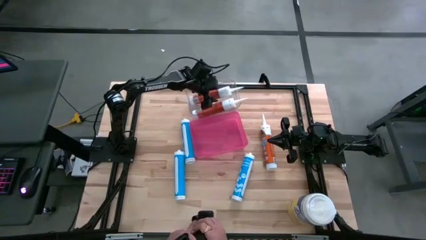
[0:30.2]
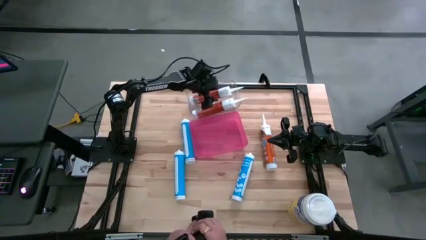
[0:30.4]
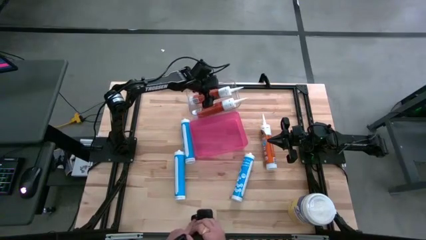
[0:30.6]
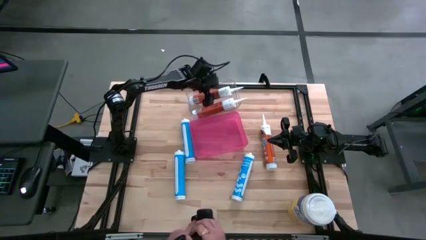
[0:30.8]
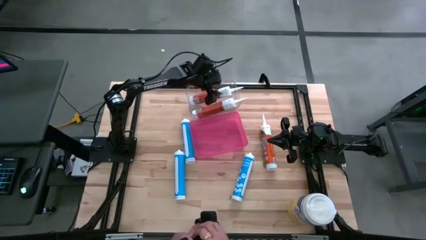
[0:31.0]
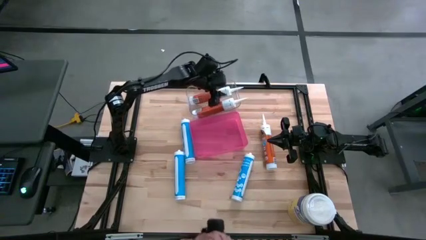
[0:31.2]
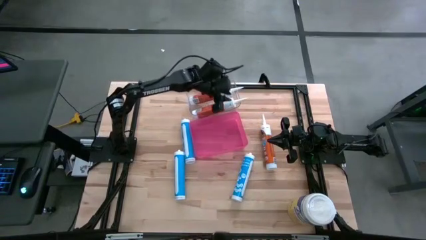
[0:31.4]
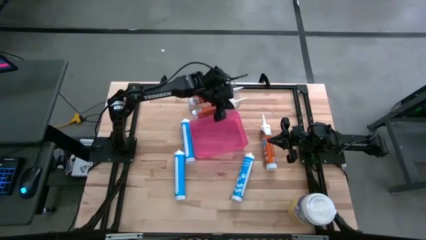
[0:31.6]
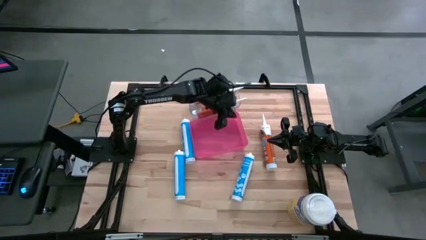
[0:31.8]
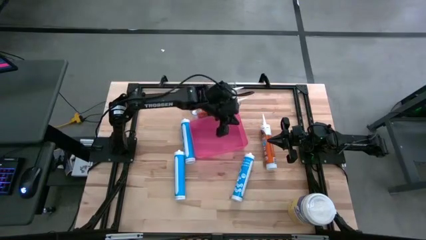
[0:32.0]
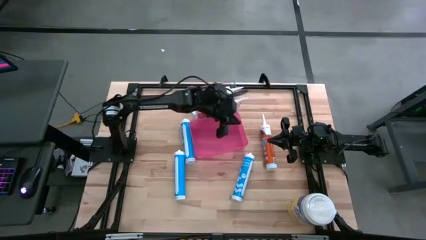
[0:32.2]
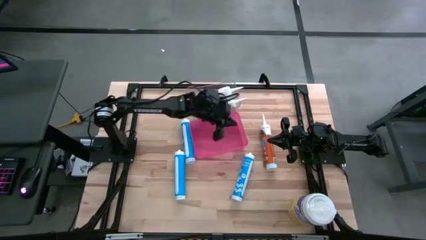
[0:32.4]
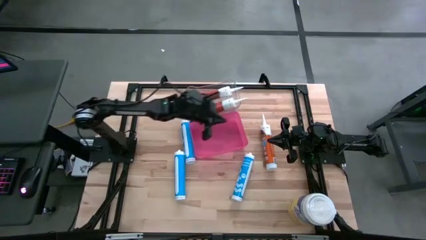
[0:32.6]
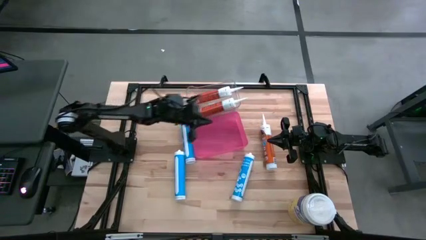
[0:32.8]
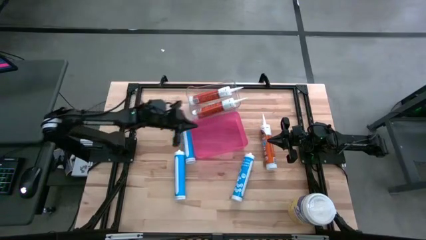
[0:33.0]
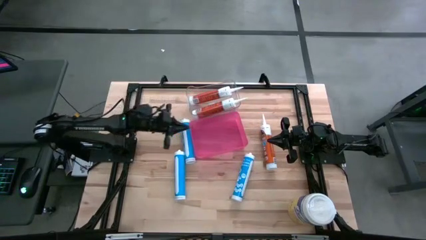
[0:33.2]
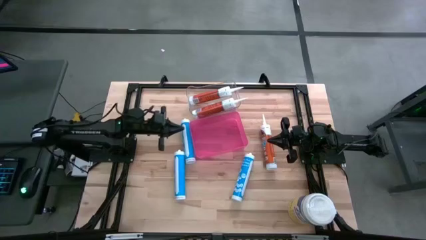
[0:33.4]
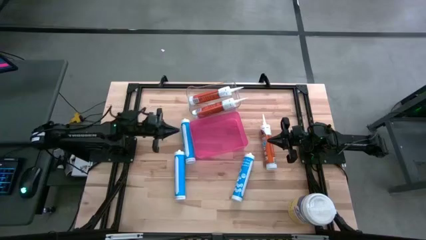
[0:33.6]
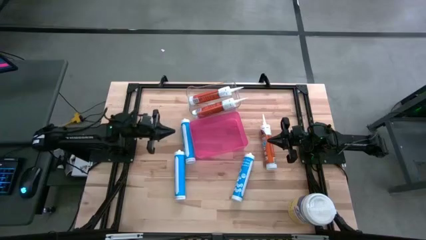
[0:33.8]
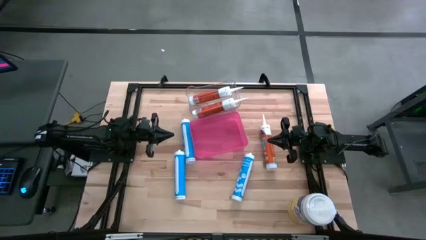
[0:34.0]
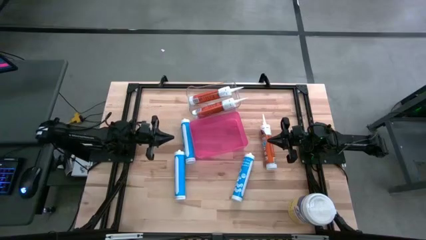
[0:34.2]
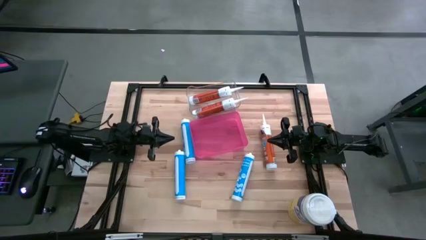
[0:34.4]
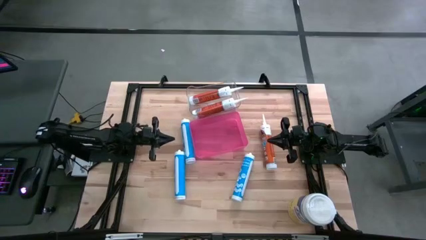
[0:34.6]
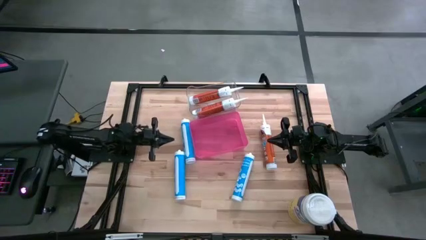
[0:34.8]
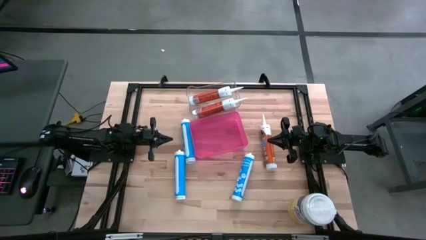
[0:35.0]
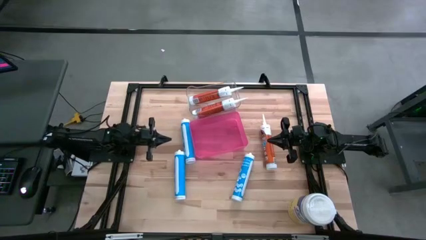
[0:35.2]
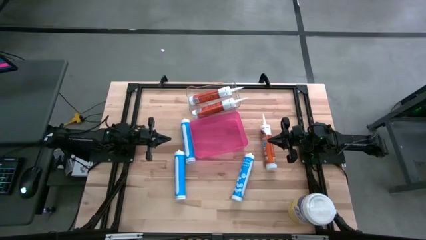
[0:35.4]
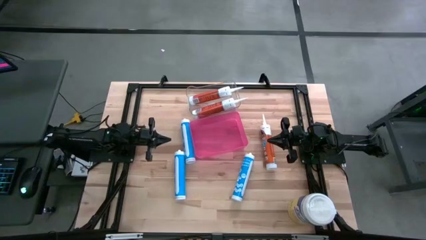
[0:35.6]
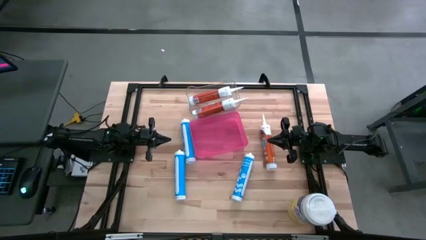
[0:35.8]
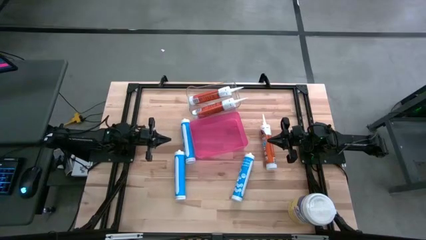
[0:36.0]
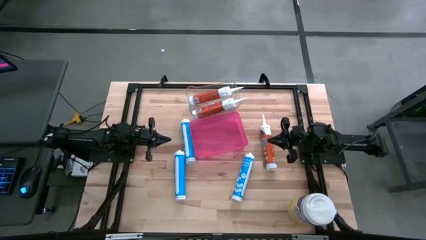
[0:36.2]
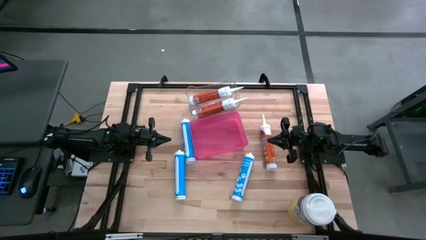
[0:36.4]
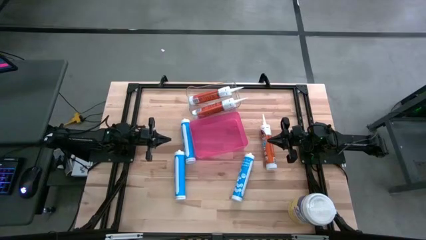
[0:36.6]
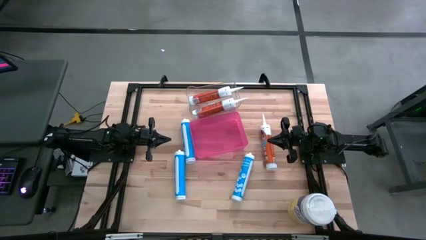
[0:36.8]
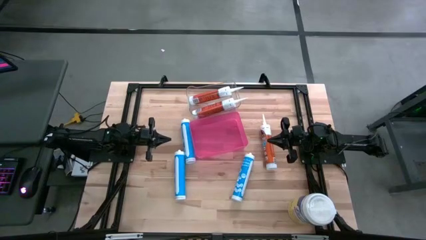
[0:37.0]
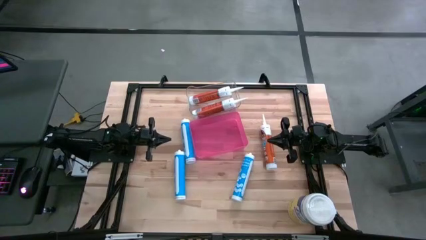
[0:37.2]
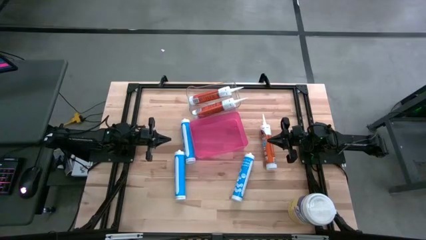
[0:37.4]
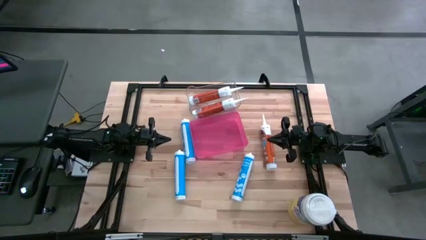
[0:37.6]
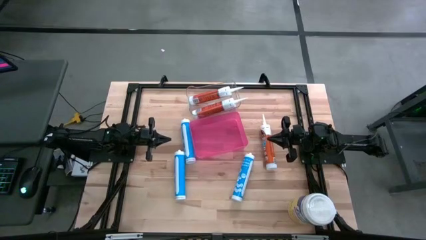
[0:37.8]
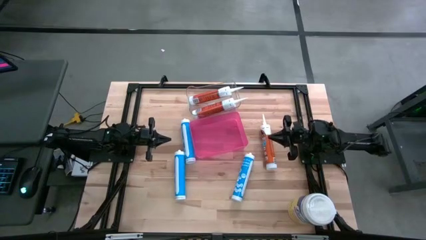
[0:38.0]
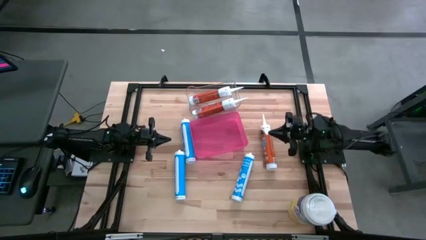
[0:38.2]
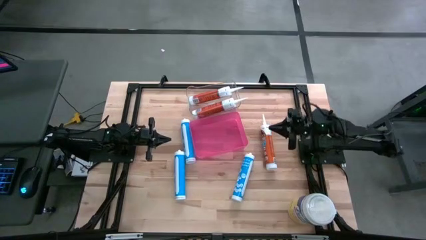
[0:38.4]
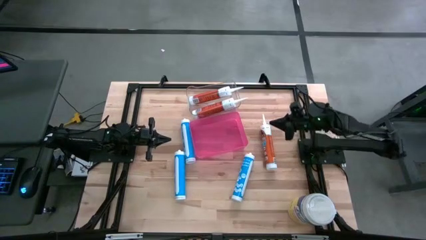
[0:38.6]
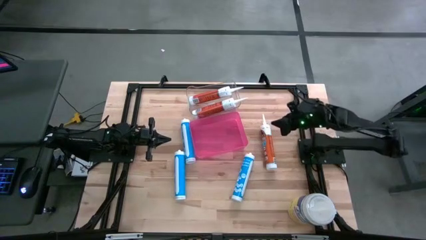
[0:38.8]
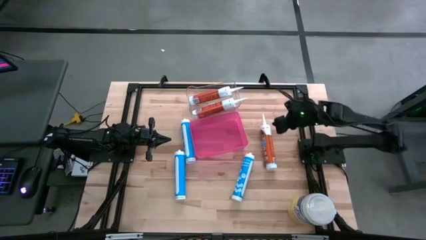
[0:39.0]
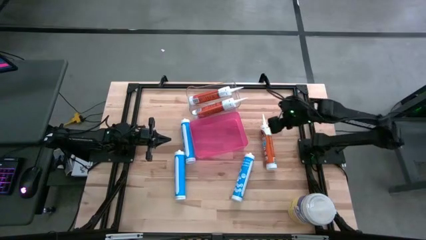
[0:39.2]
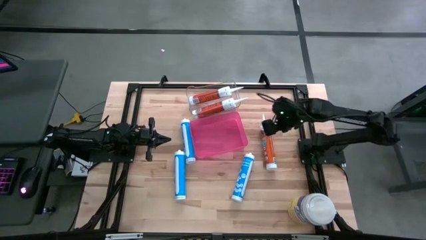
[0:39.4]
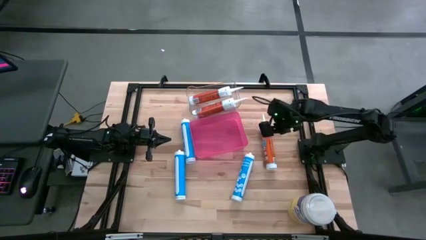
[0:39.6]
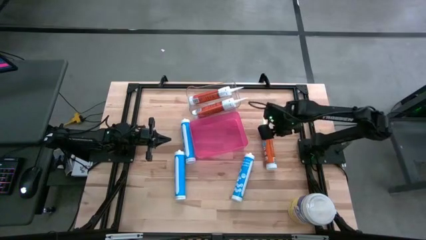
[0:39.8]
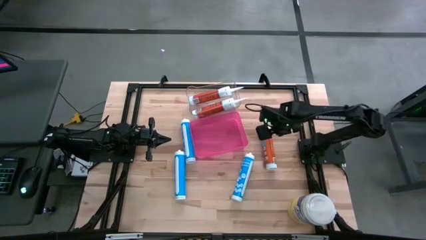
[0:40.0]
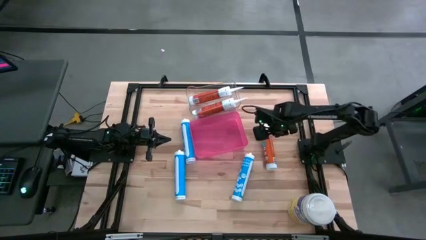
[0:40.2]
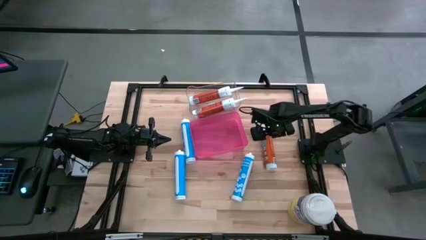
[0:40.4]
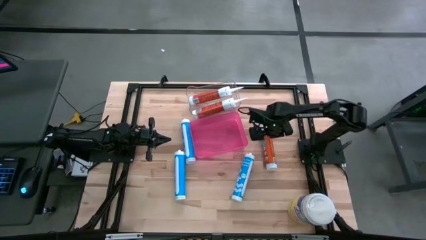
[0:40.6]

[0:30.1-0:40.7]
Task: Pick & place silicon tubes, Sealant and Lysol wipes
Put the orange sealant into the transparent bin

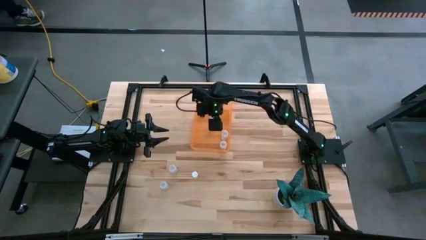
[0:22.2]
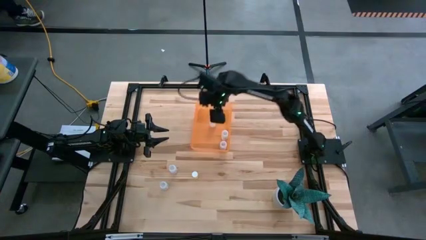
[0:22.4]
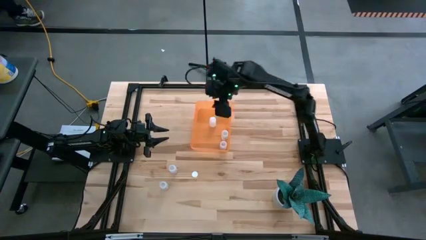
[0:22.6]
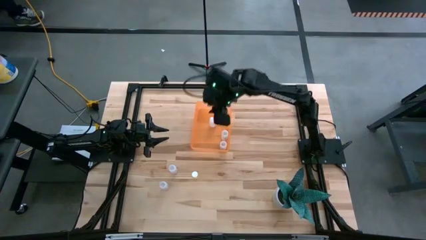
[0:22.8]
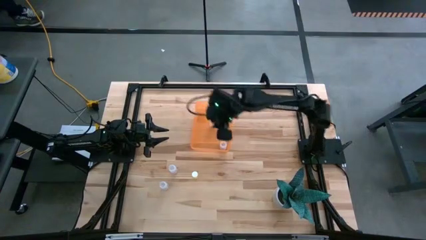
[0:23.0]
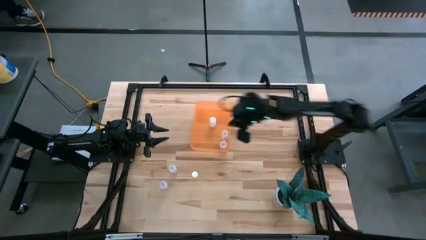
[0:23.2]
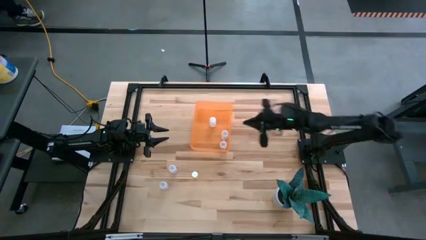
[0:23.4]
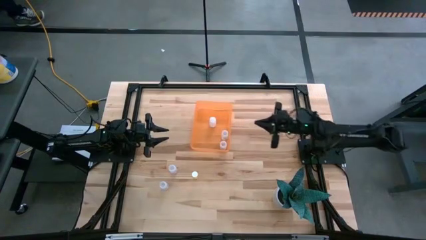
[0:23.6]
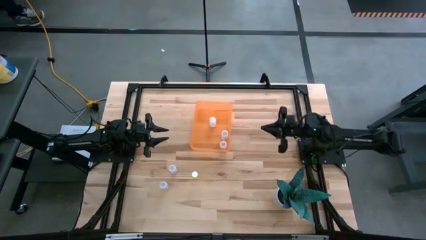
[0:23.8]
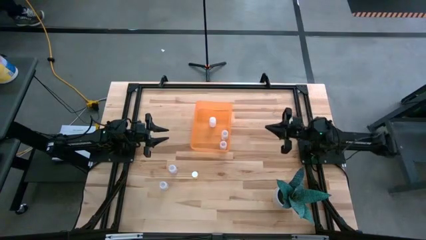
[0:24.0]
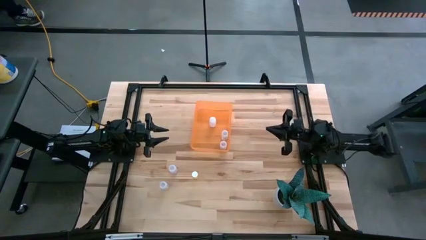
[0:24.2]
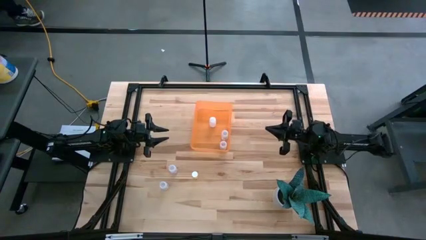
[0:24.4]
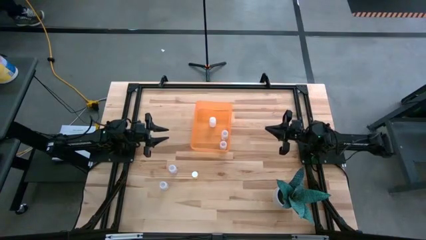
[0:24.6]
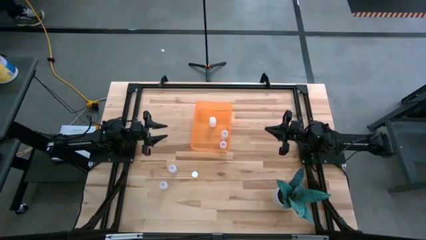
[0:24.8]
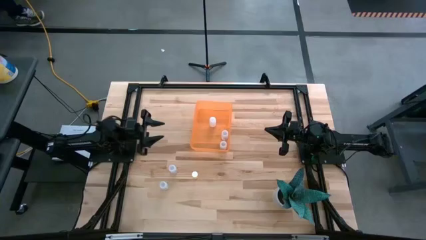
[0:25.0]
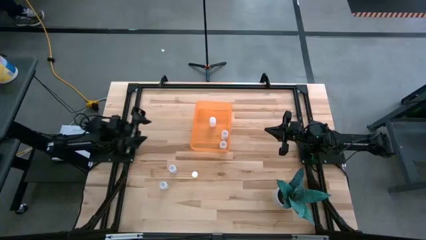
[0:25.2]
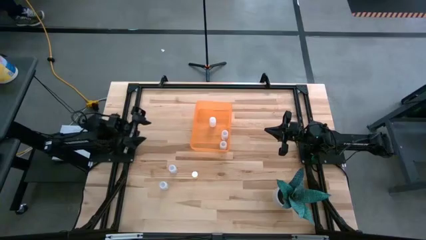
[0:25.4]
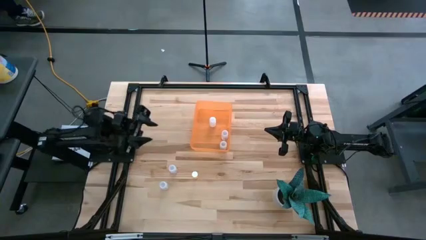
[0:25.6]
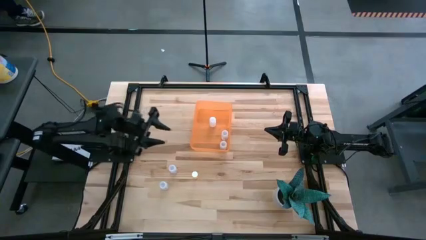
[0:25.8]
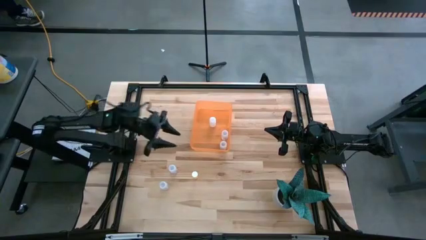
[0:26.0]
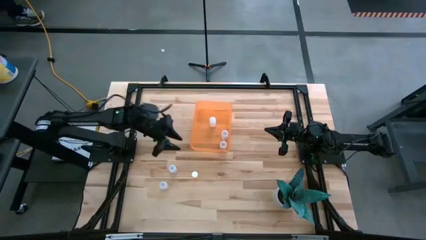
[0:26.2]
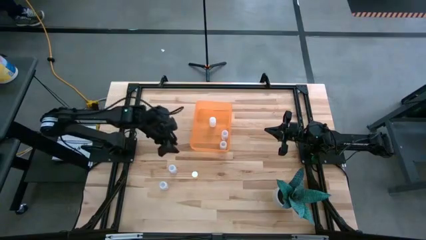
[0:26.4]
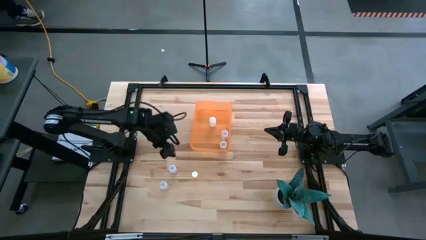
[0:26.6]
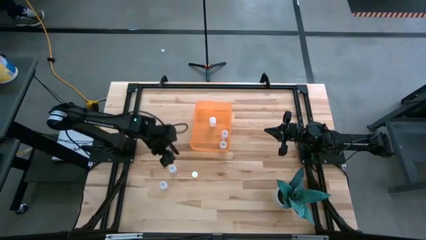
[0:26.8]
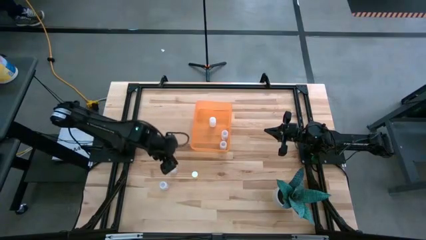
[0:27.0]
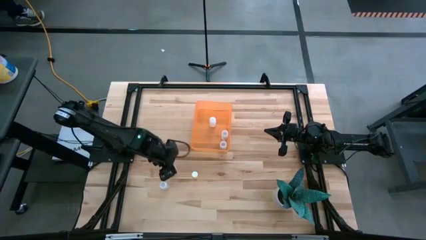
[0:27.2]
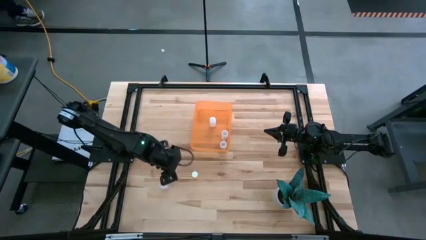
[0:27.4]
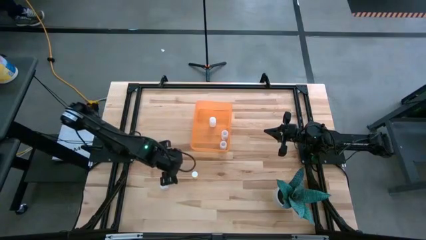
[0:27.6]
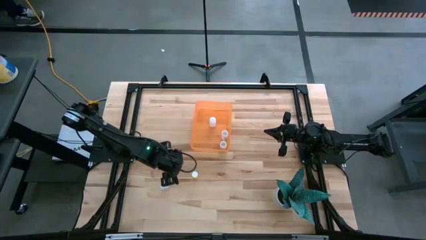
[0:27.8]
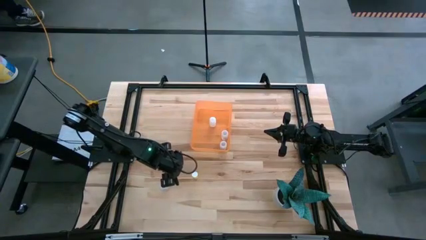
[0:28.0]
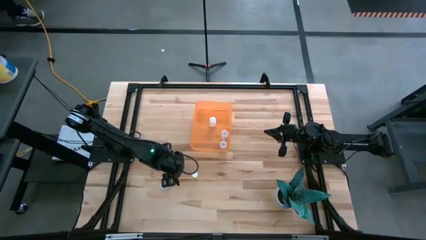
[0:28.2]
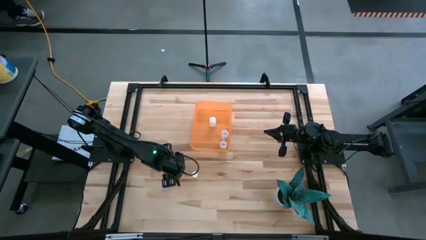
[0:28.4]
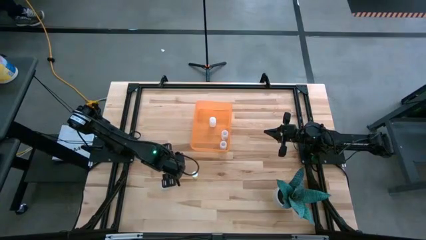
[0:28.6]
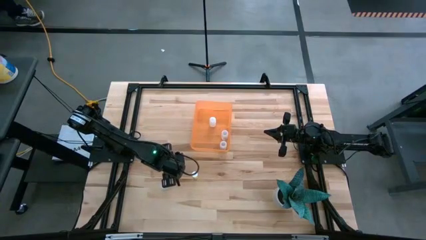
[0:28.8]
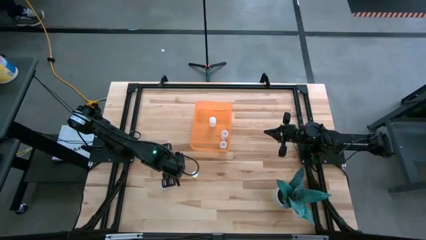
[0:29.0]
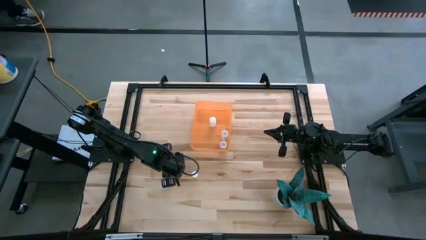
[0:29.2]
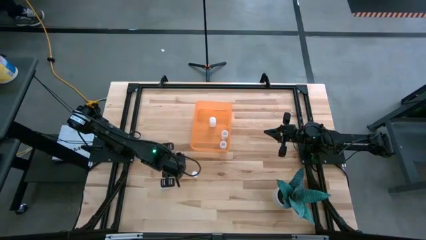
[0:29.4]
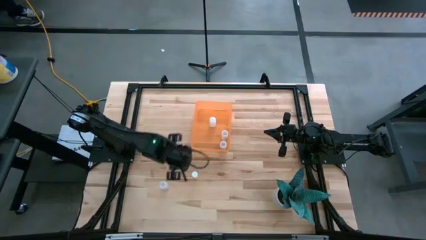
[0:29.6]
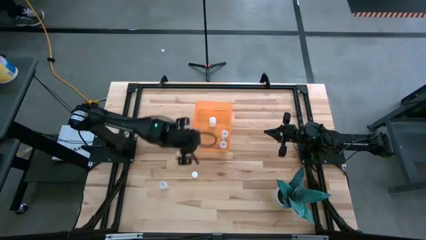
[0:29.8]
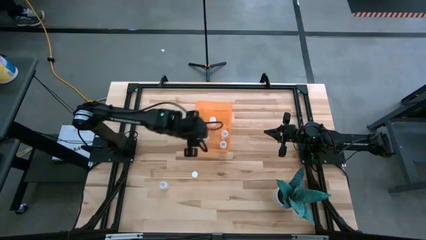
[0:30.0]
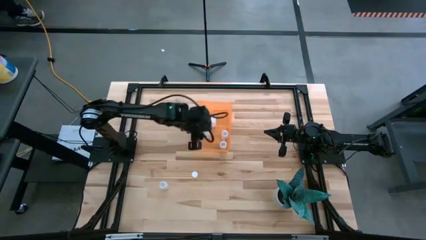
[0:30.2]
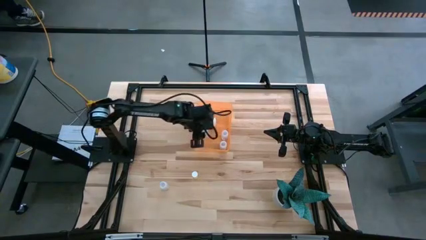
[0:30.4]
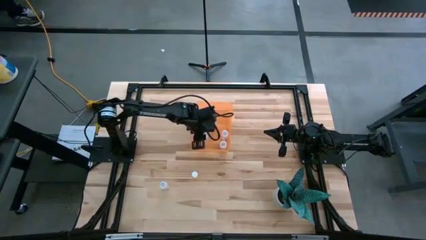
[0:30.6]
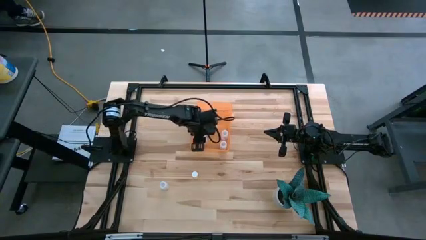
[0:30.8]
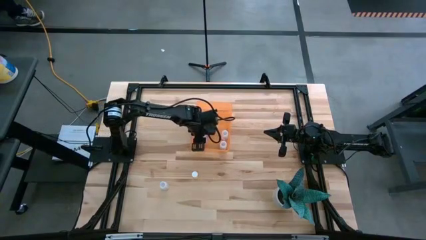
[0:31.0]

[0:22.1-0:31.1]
Task: Pick and place pill bottles into a basket
Put the transparent medicine bottle into the yellow bin
